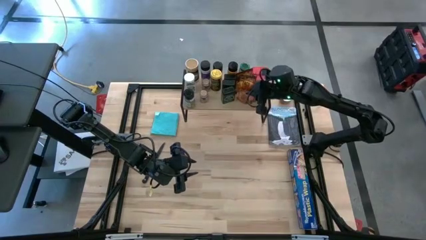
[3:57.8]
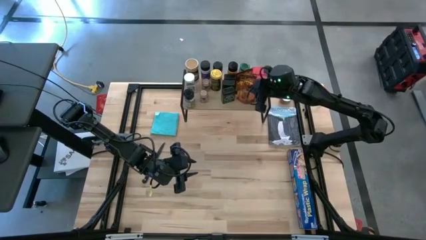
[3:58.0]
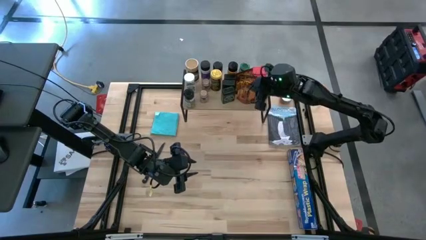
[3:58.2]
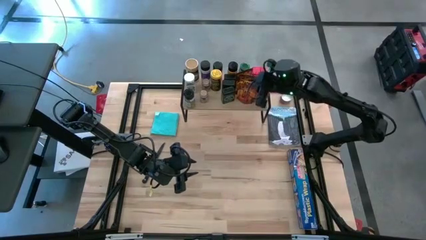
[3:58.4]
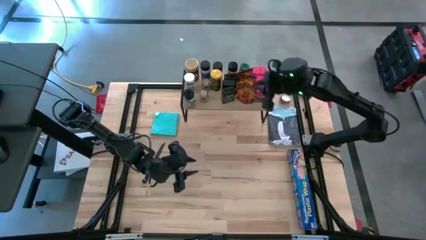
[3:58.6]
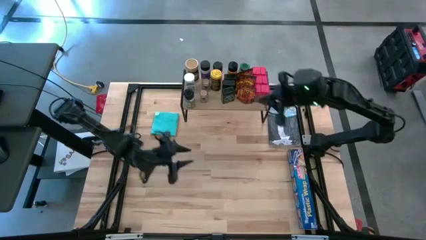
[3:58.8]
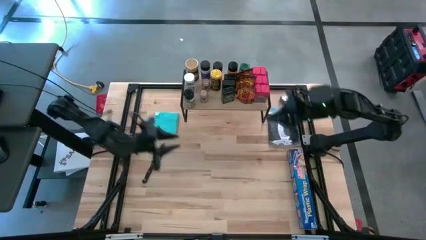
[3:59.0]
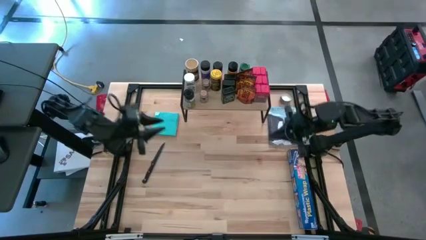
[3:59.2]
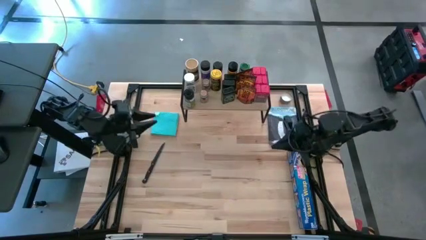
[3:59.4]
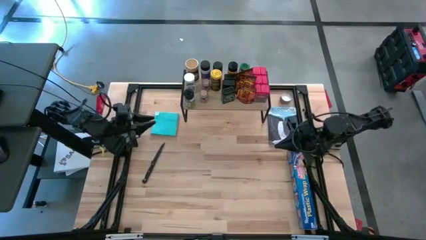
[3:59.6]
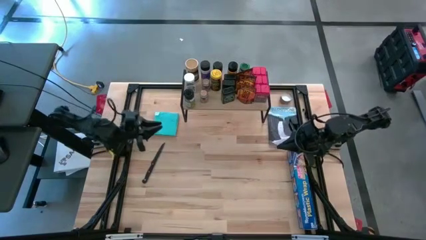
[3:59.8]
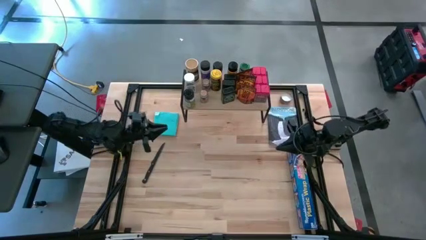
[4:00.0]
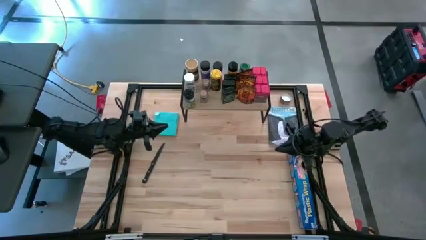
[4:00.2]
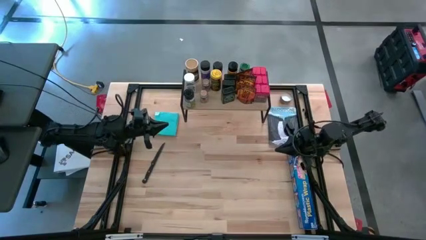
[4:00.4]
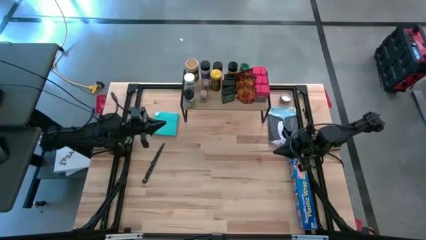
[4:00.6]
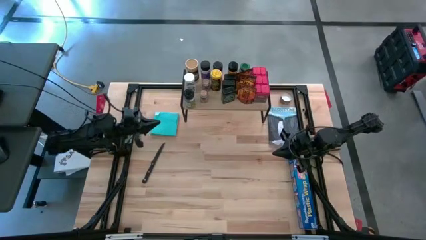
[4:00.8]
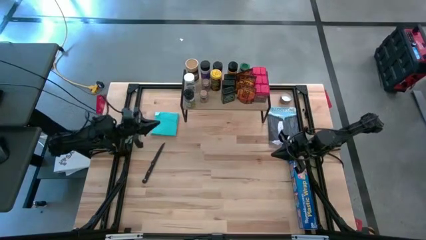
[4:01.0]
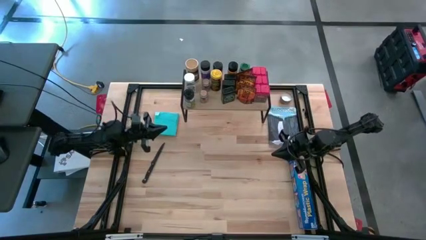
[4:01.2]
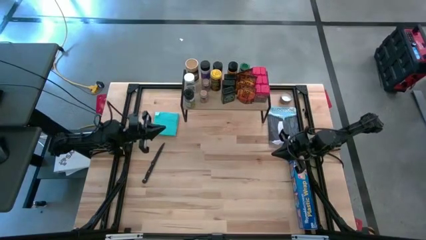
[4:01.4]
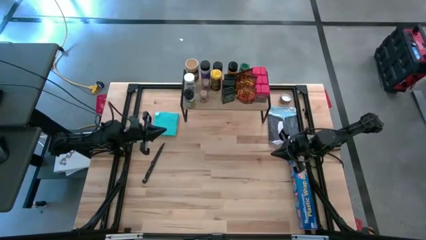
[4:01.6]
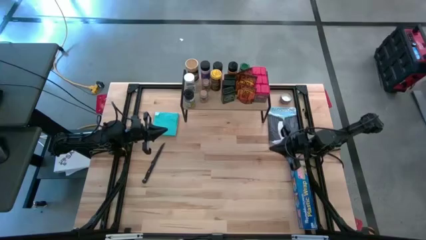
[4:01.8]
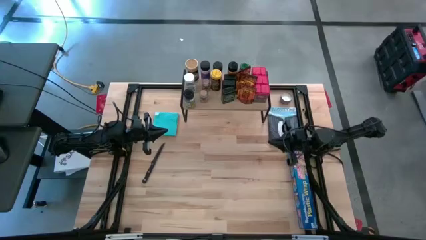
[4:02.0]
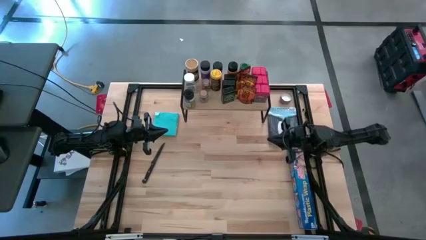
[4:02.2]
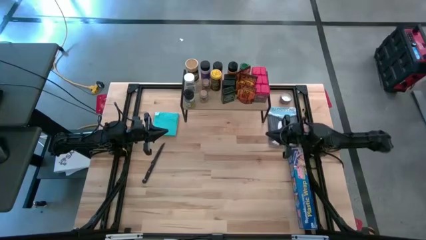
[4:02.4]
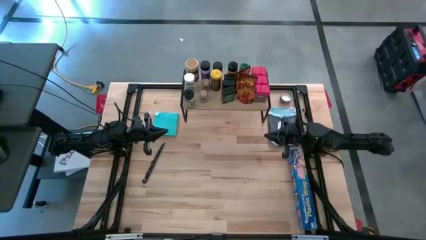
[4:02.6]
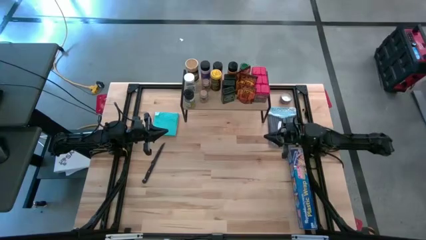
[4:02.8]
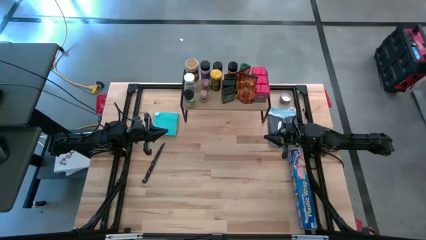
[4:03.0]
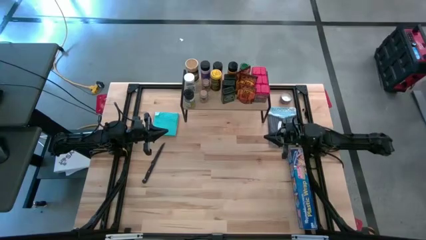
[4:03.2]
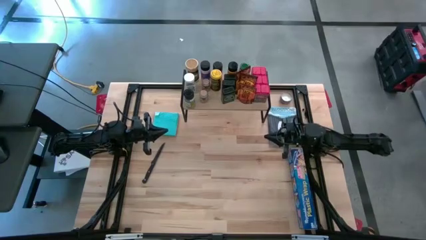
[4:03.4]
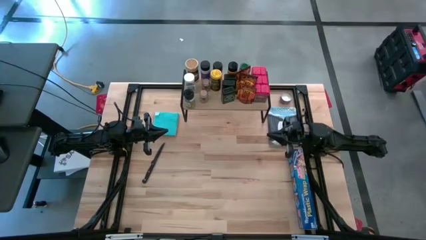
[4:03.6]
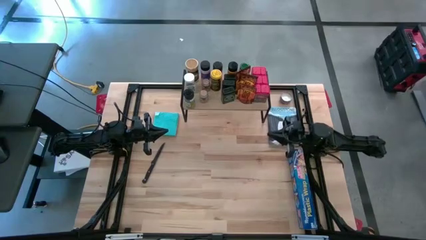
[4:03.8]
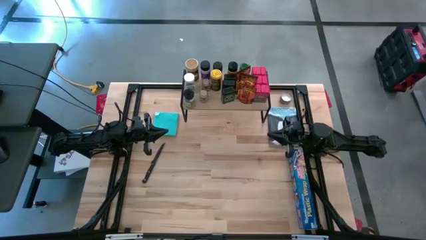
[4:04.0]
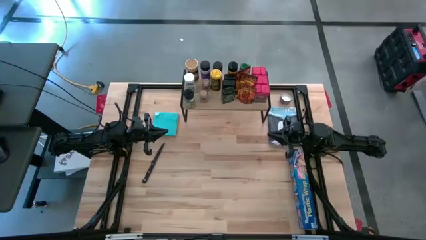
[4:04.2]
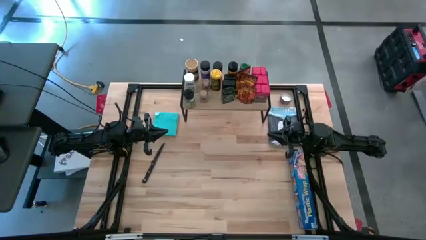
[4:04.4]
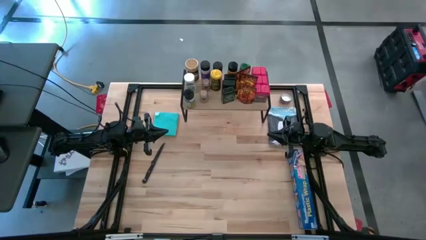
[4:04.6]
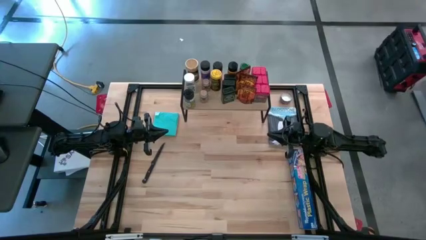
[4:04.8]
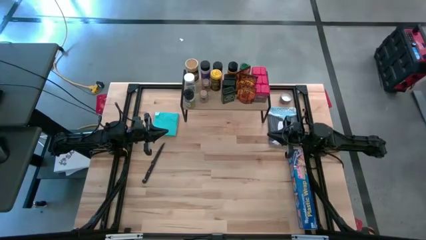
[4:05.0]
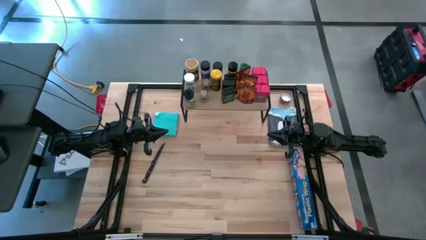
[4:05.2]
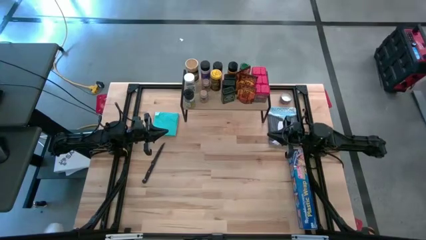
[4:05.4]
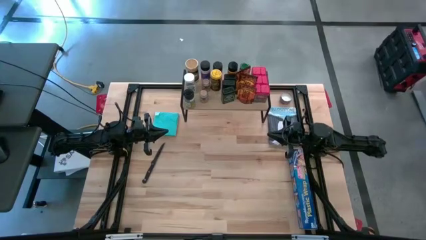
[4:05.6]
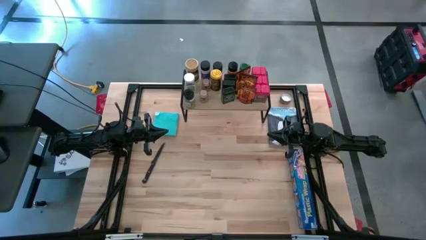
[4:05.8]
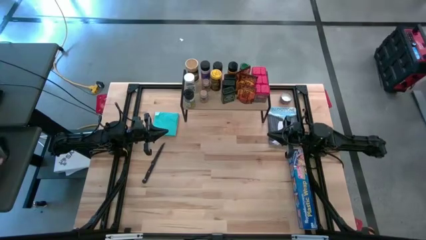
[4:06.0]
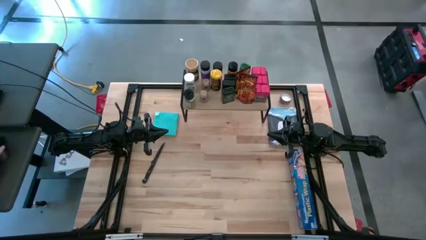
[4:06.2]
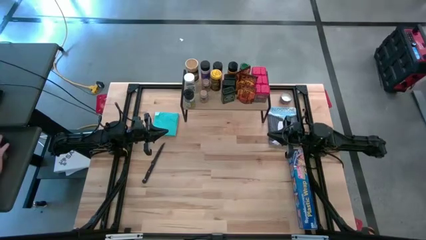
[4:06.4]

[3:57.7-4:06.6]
Task: Shelf spices
Return to Home Position

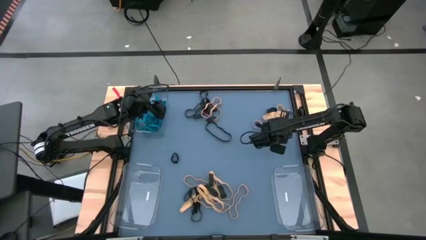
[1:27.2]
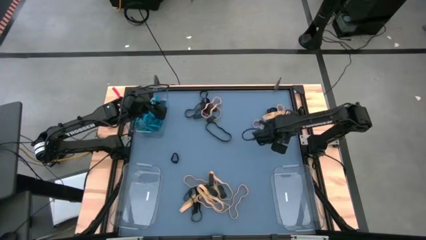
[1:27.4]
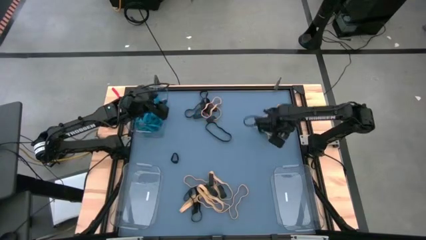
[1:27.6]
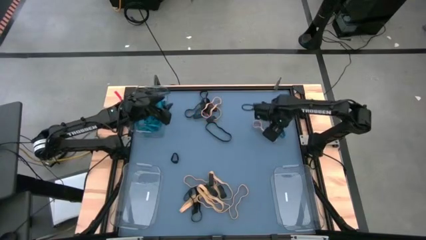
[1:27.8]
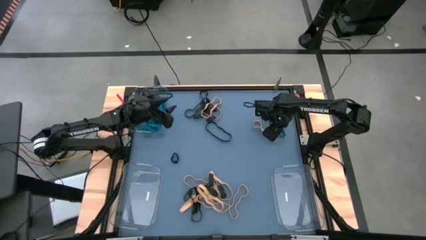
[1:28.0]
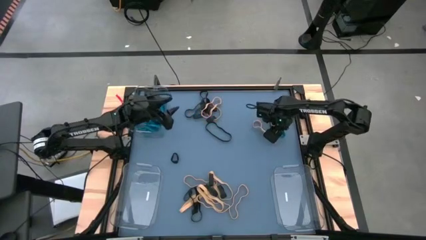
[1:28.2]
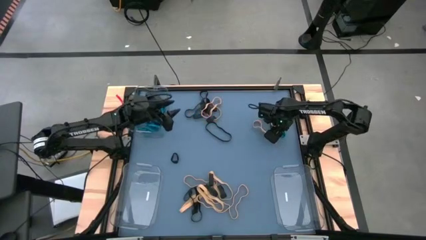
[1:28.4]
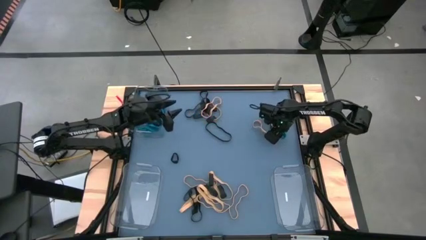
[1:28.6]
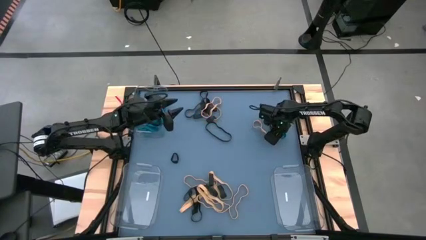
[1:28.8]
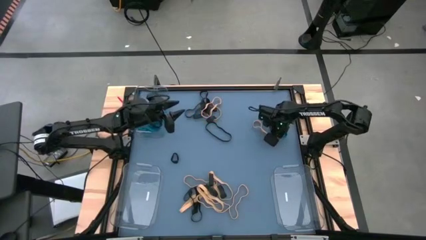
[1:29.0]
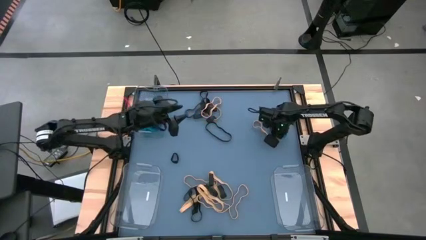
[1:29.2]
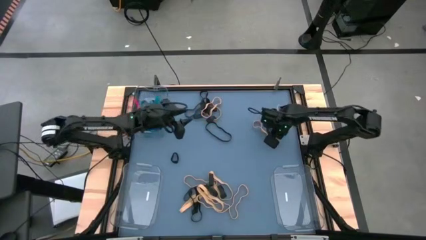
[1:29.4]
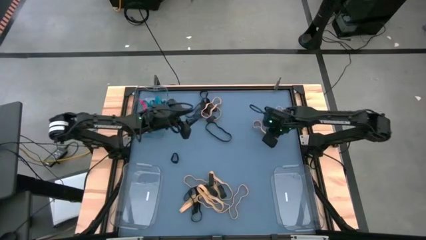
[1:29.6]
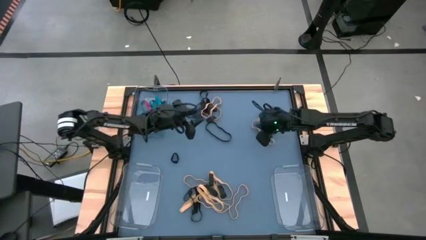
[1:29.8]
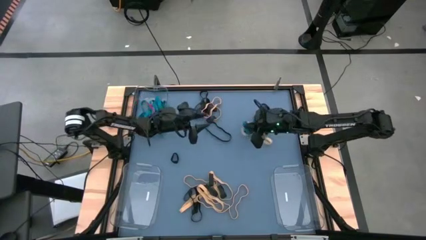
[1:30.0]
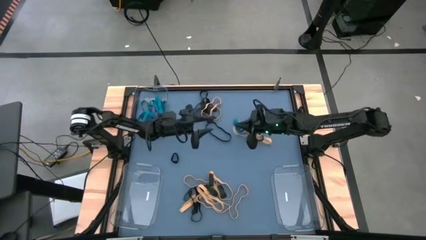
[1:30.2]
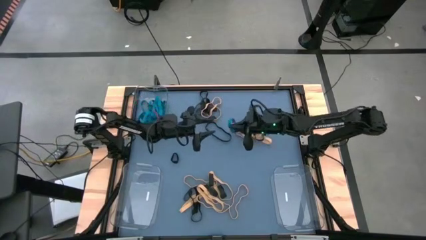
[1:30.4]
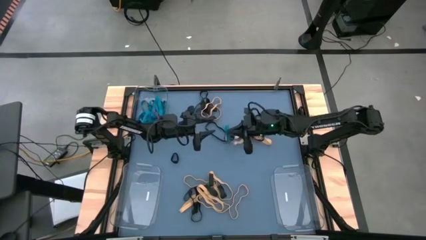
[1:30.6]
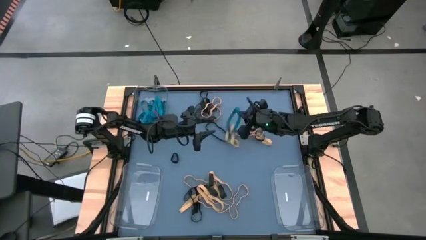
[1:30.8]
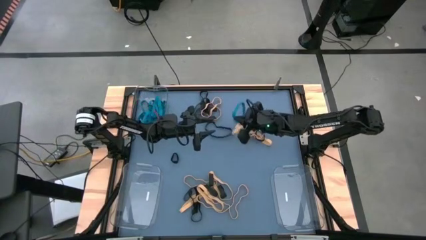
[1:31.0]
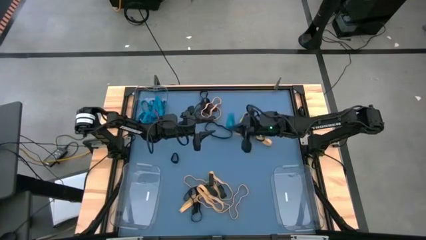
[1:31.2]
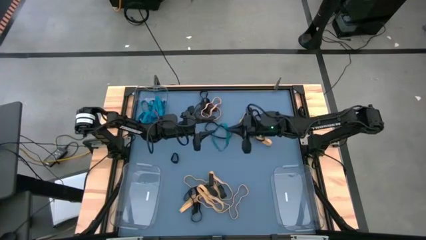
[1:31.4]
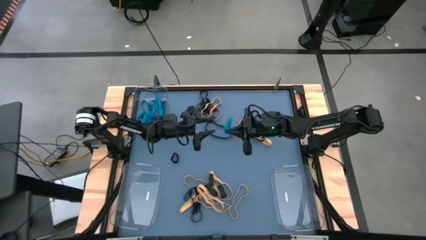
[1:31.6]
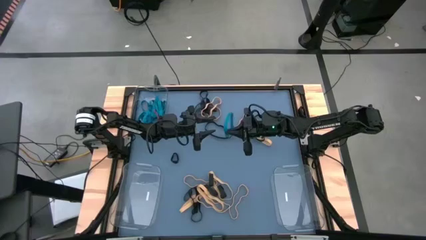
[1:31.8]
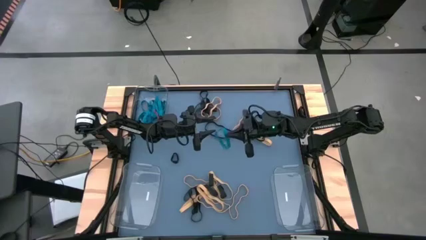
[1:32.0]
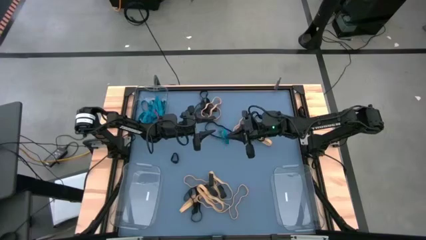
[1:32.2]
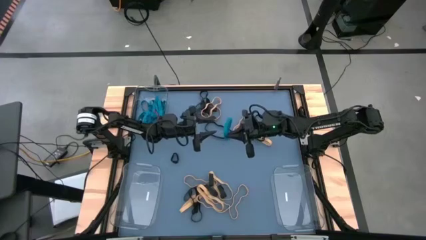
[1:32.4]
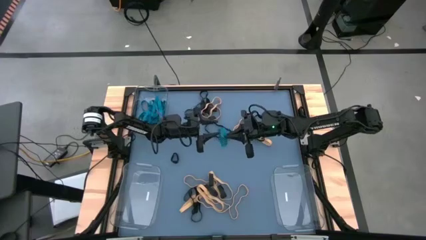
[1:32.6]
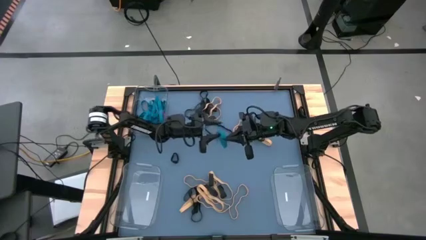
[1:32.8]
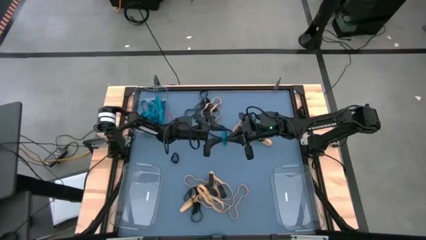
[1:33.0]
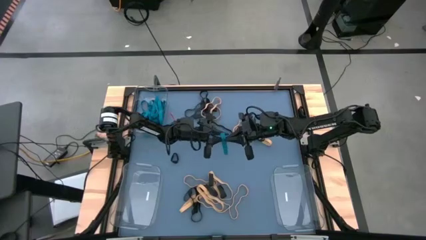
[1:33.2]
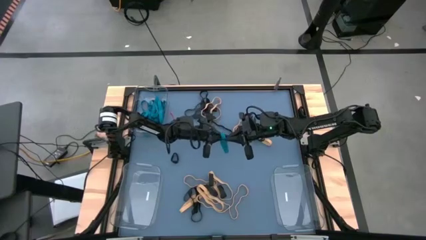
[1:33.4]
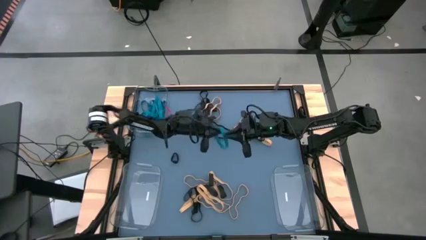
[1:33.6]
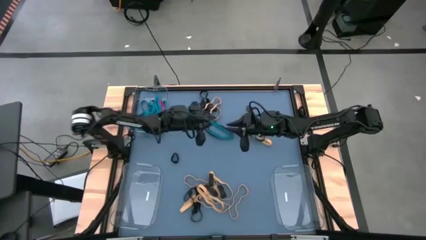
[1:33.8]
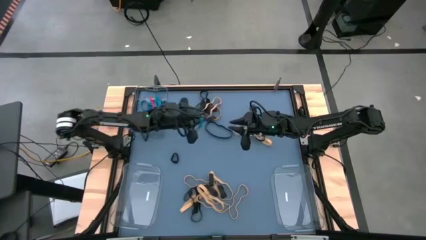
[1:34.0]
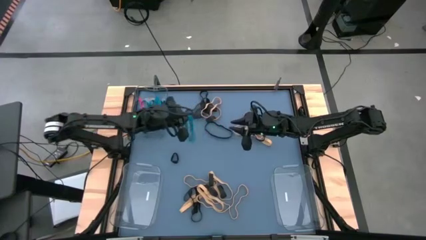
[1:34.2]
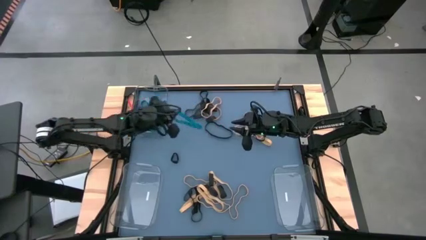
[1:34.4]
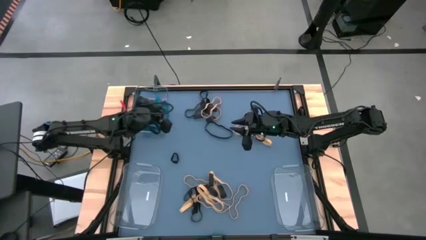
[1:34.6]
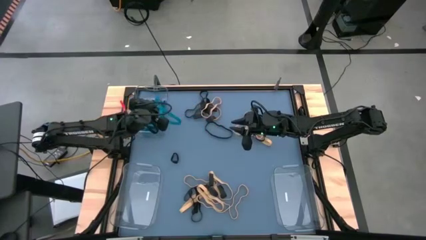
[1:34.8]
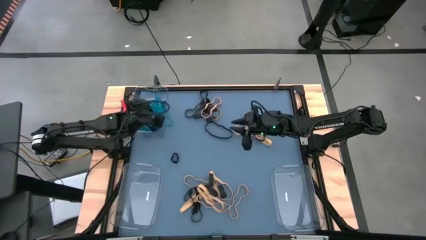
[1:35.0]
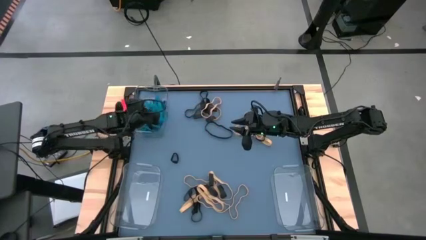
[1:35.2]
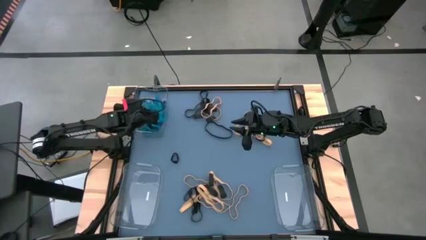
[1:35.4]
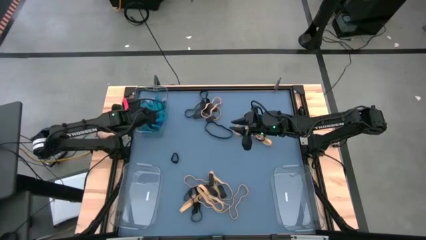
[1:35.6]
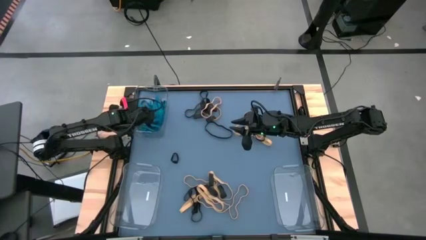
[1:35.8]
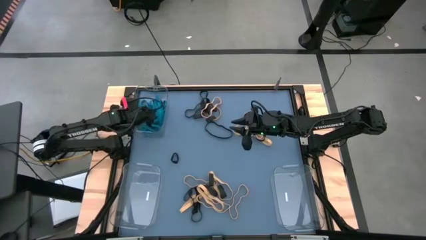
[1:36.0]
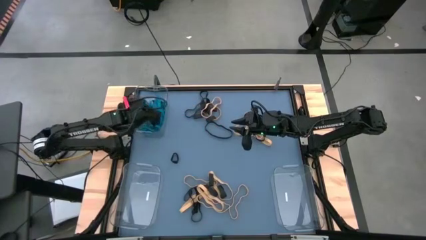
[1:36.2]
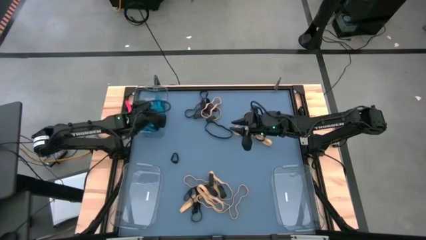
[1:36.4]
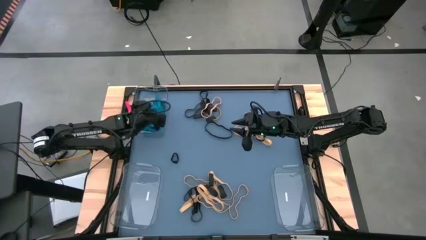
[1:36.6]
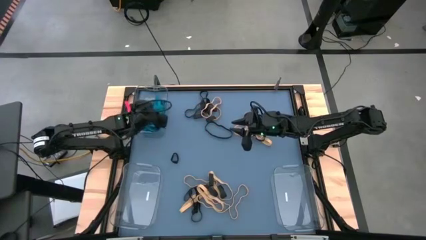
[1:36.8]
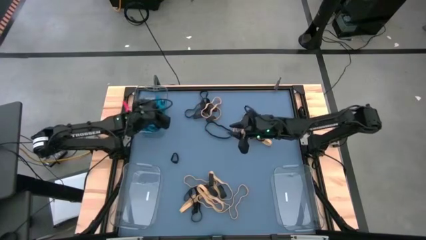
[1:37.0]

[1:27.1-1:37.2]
Task: Sort rubber bands into baskets
Put the blue rubber band into the top transparent bin
